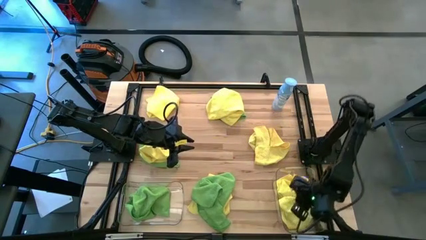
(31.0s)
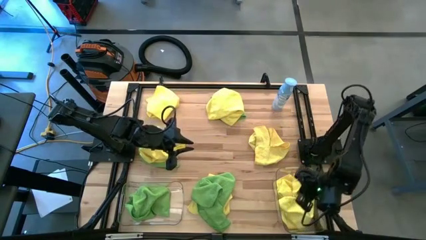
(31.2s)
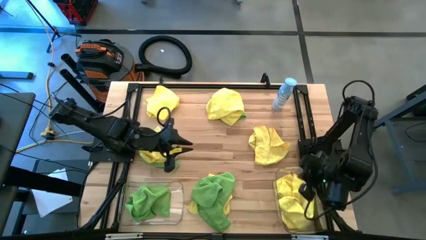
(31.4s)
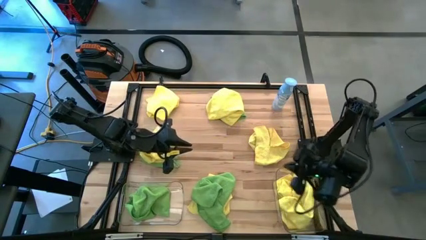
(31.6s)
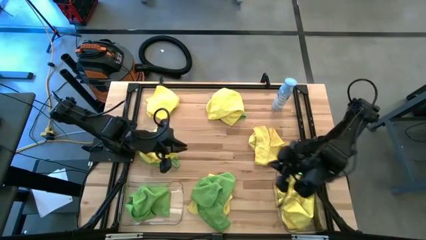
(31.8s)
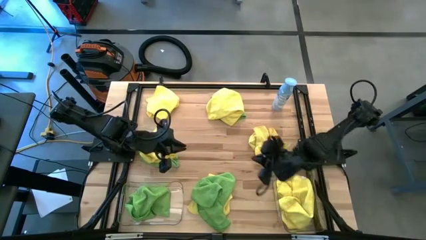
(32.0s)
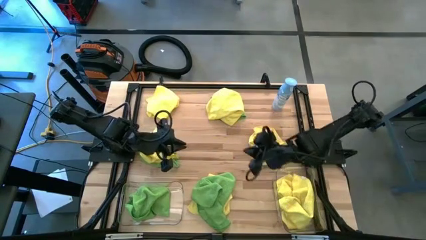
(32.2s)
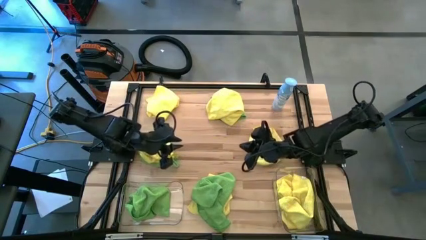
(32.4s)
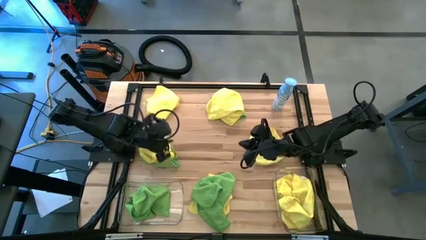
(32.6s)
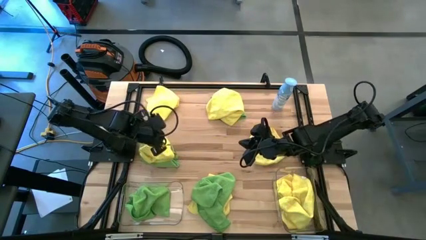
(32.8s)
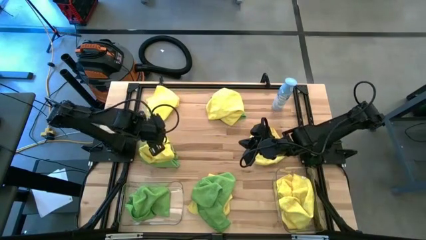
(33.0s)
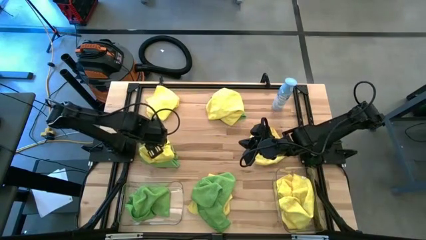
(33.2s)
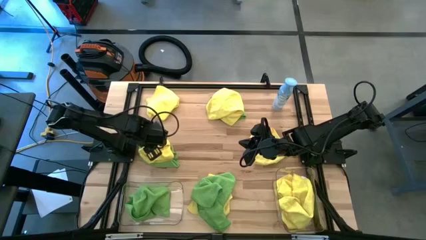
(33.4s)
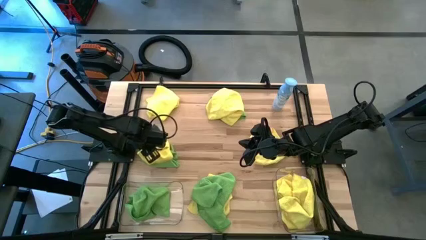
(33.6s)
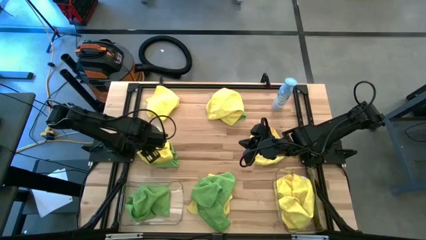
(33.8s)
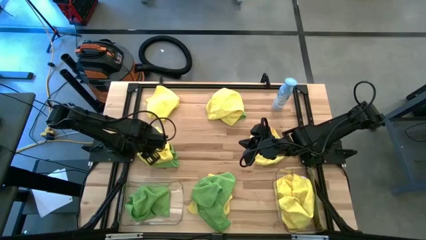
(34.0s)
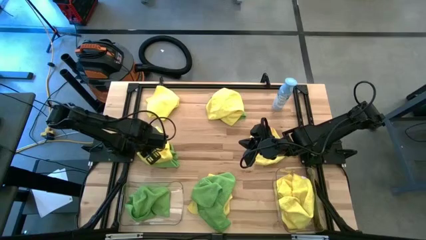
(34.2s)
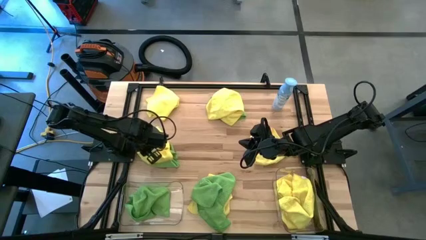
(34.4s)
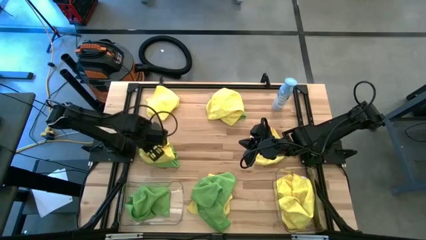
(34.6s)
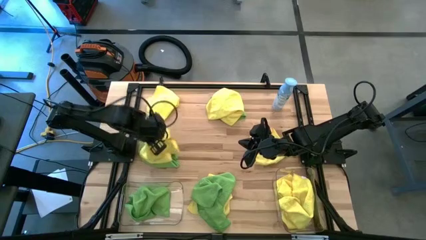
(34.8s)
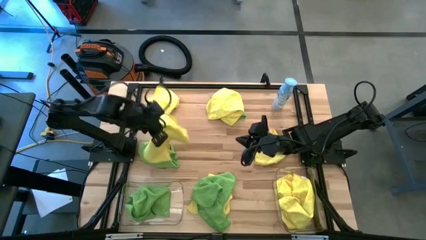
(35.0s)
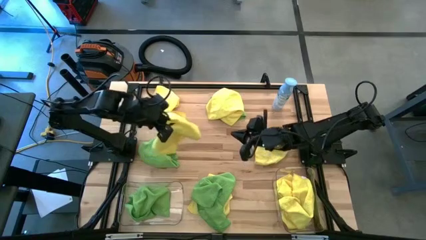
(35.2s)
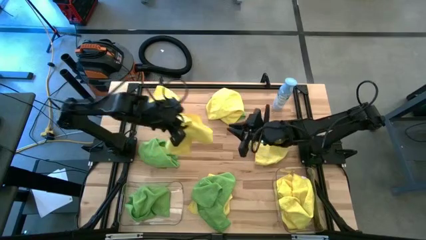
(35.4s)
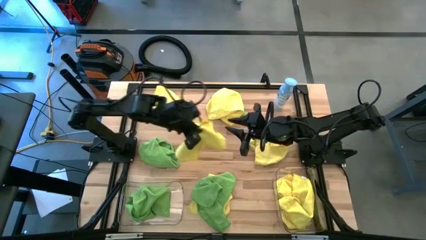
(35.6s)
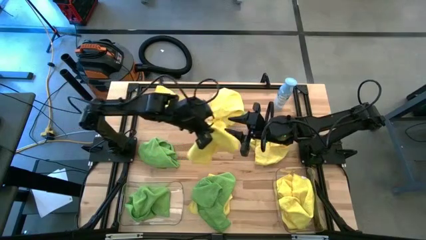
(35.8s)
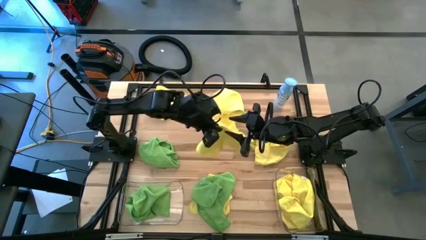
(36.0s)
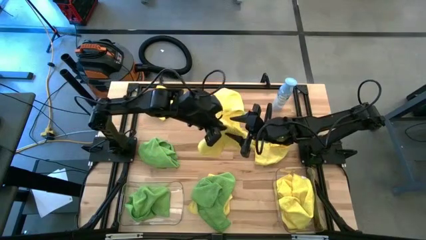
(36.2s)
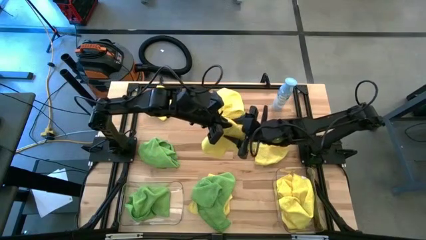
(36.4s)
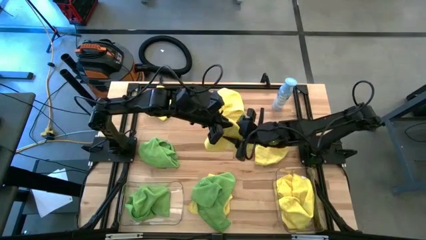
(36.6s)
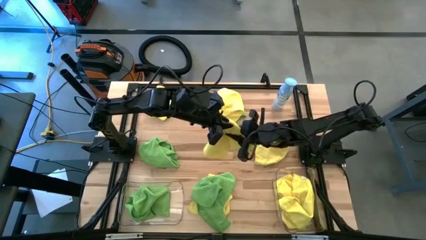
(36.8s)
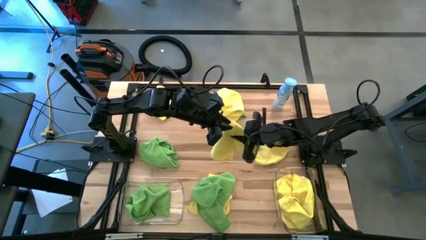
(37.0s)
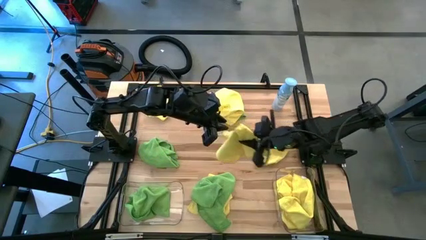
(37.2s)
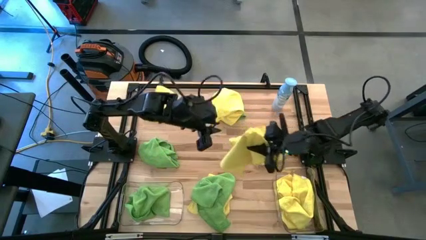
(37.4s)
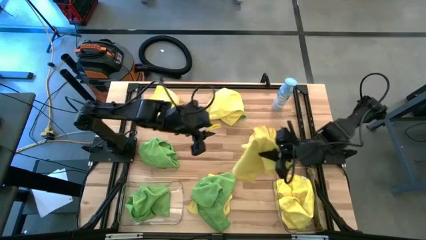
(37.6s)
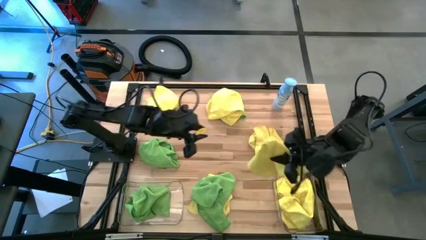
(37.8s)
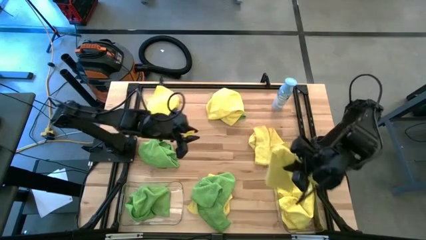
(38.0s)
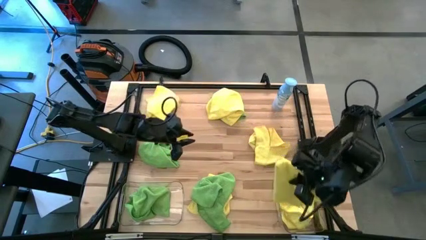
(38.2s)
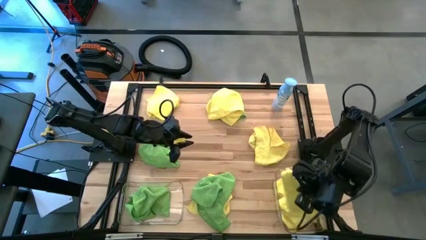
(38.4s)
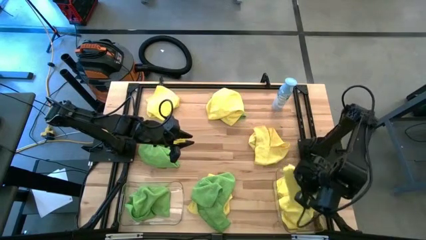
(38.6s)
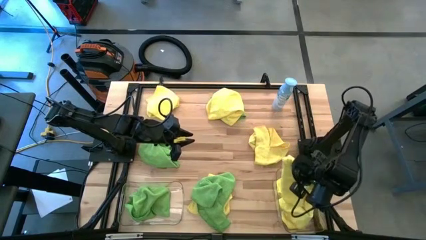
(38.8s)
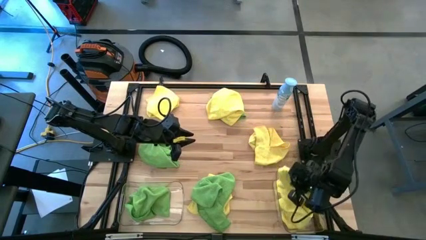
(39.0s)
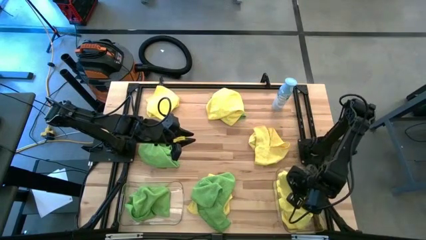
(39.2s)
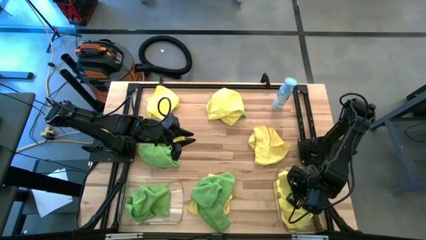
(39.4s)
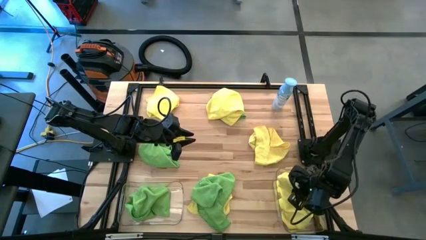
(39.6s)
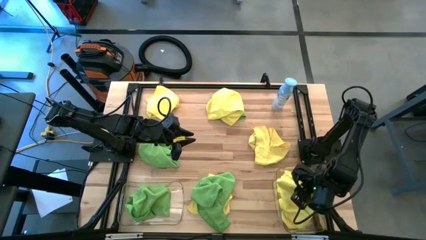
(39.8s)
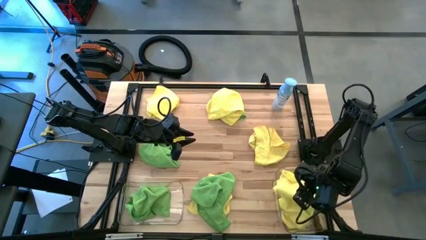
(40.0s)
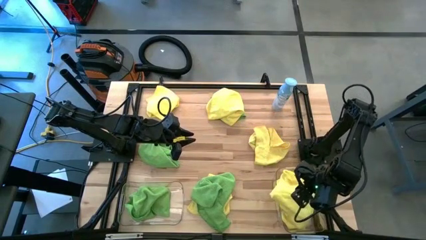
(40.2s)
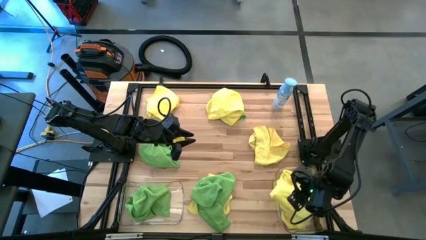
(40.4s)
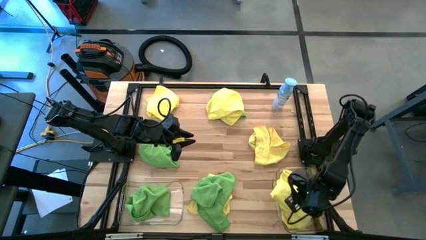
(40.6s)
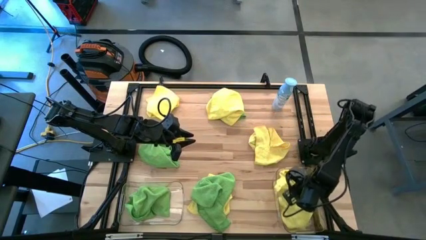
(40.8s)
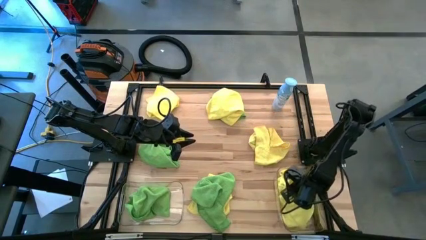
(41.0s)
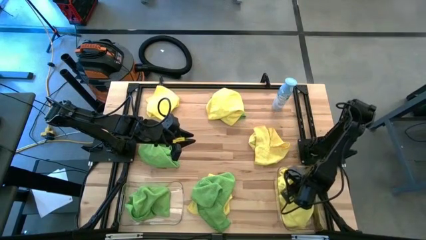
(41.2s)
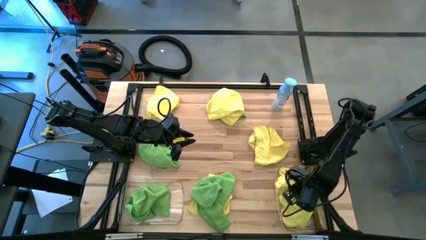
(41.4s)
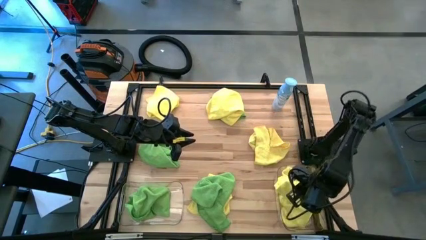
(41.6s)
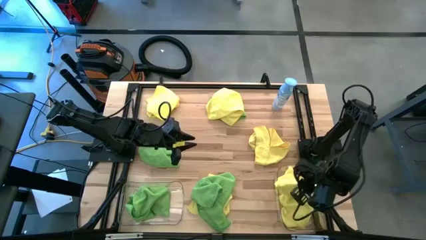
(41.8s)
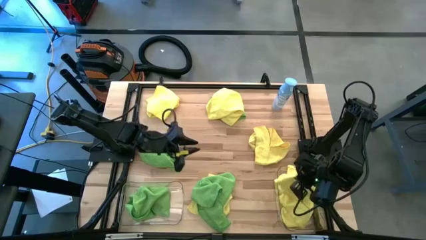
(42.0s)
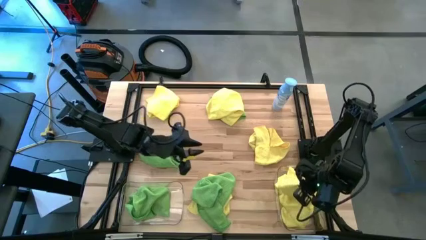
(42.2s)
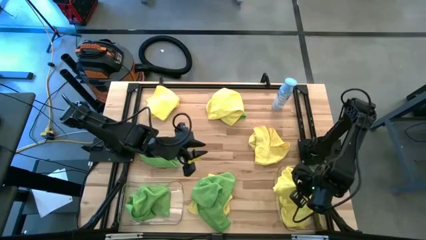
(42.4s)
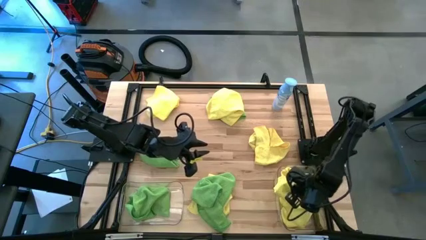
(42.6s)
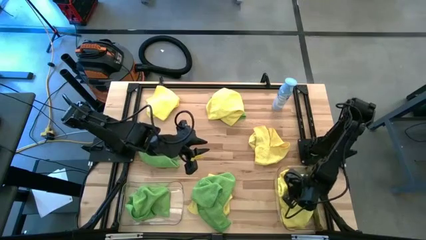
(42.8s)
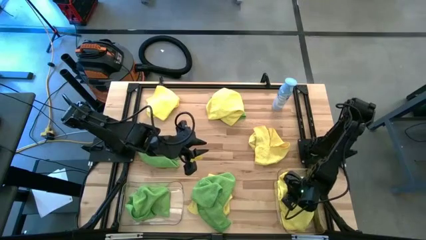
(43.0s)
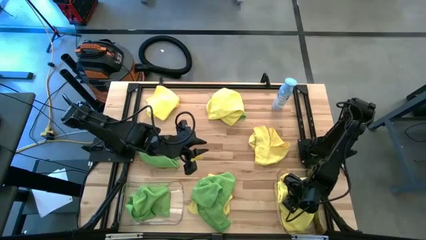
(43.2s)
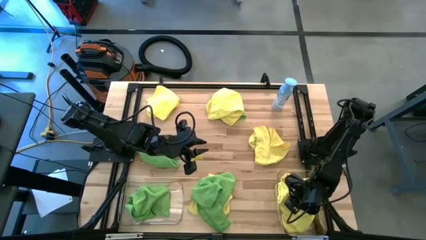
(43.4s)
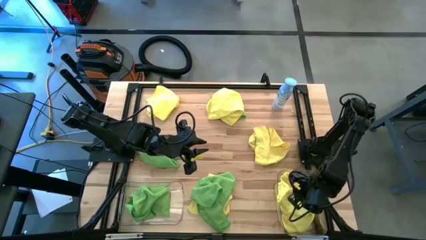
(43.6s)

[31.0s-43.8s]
Task: Sort microfiber towel by color & place in baskets
Put the middle left yellow microfiber towel into the right transparent bin
